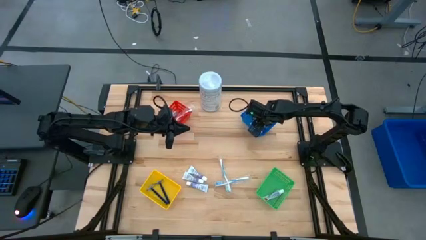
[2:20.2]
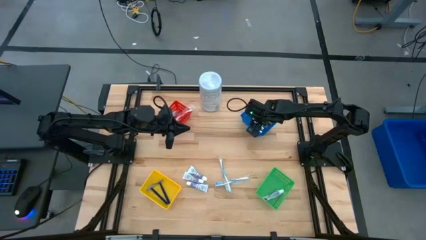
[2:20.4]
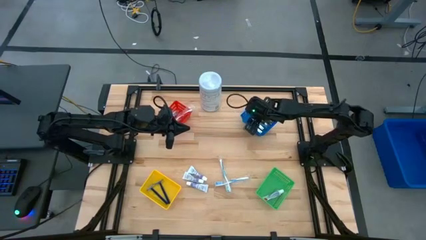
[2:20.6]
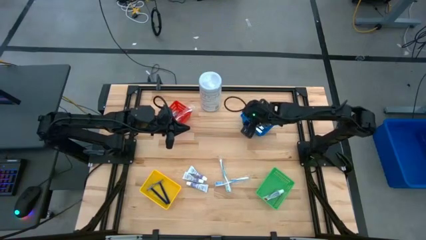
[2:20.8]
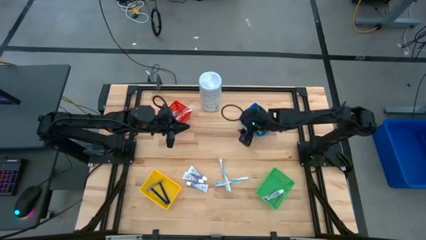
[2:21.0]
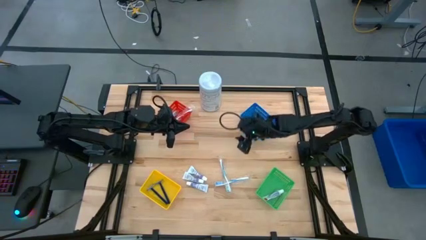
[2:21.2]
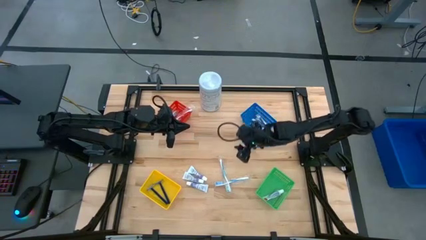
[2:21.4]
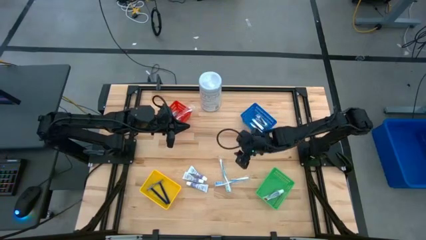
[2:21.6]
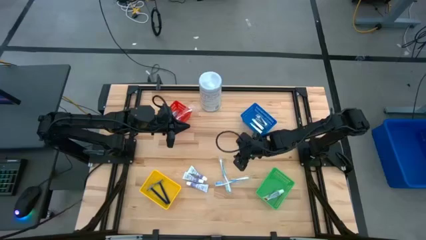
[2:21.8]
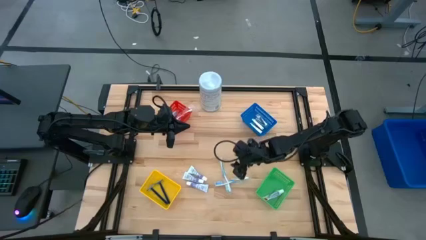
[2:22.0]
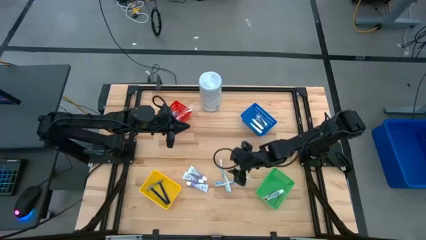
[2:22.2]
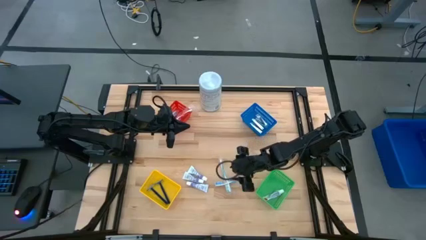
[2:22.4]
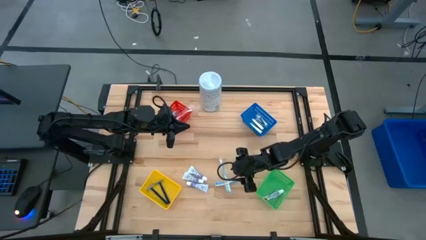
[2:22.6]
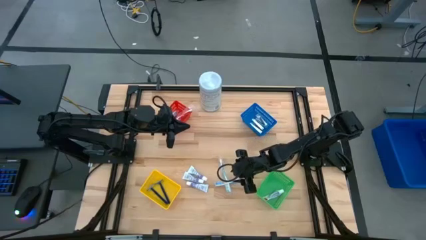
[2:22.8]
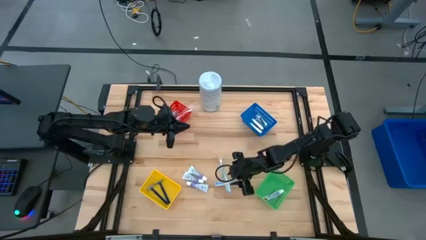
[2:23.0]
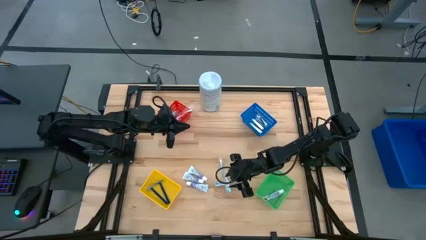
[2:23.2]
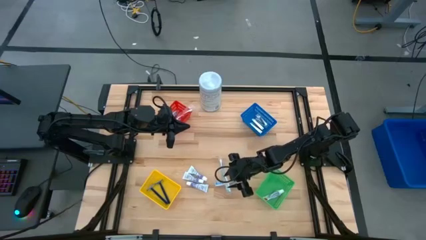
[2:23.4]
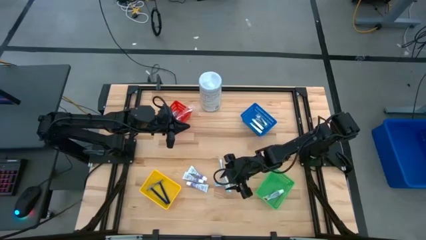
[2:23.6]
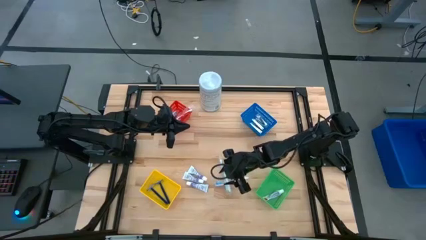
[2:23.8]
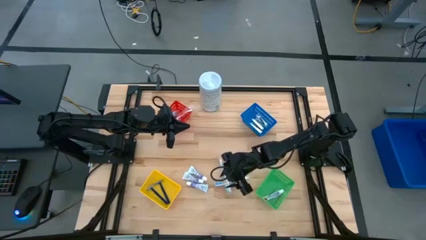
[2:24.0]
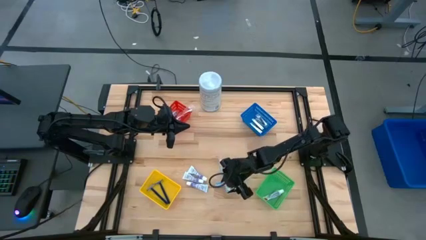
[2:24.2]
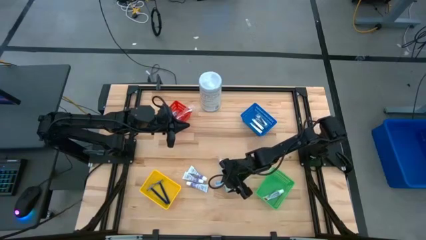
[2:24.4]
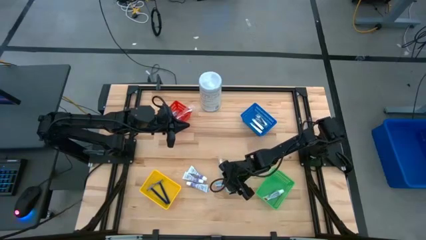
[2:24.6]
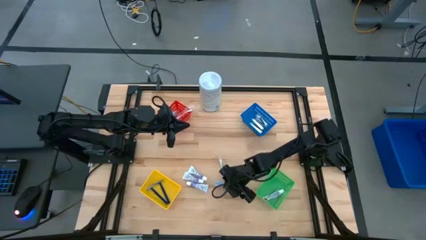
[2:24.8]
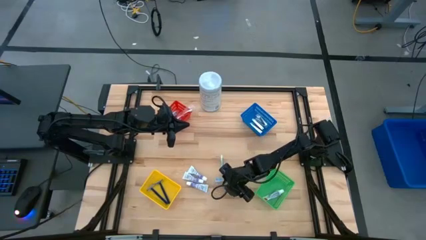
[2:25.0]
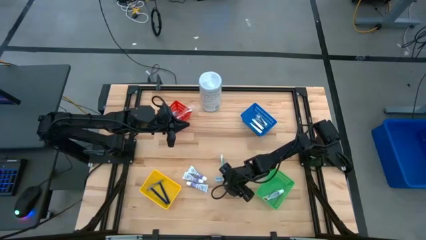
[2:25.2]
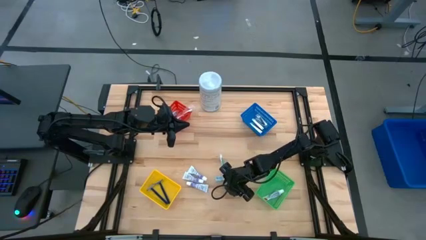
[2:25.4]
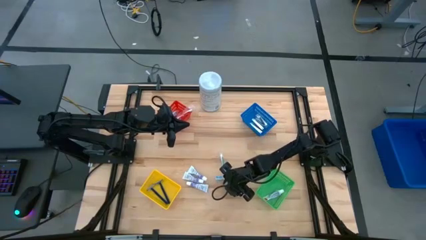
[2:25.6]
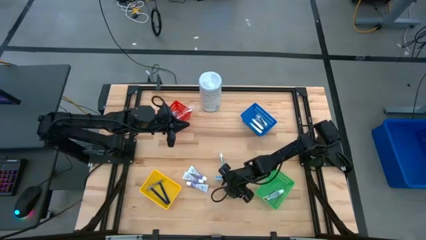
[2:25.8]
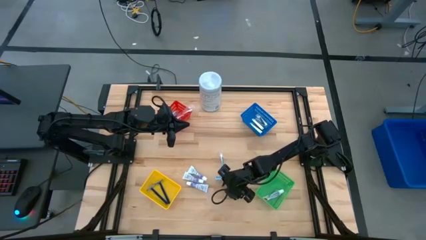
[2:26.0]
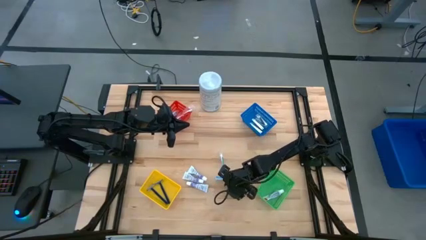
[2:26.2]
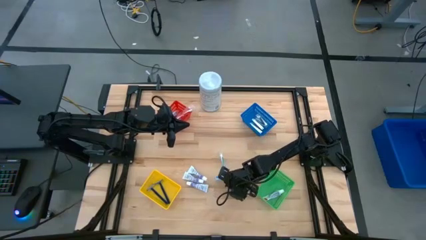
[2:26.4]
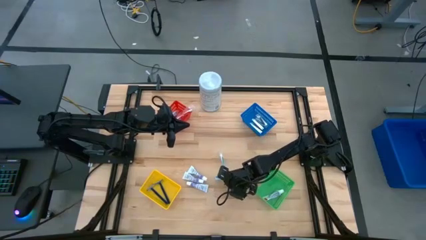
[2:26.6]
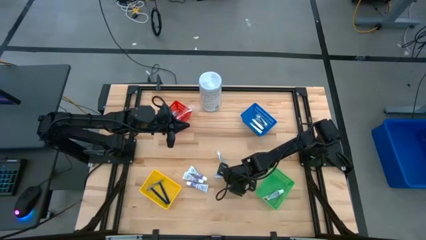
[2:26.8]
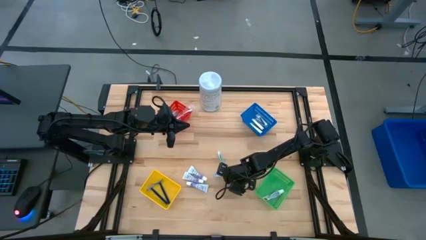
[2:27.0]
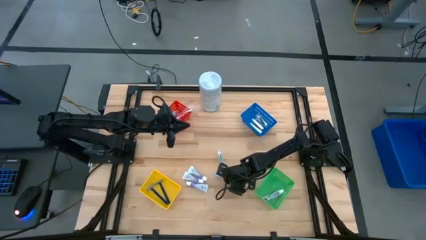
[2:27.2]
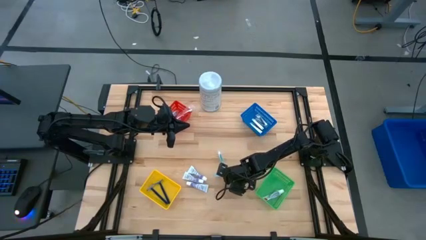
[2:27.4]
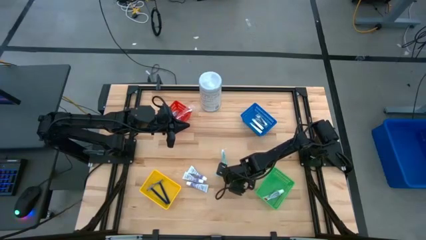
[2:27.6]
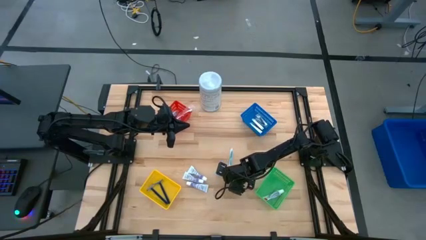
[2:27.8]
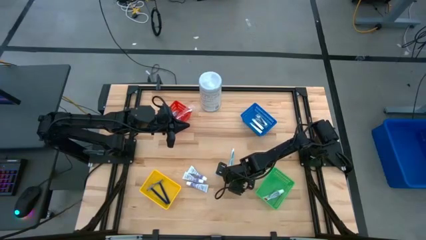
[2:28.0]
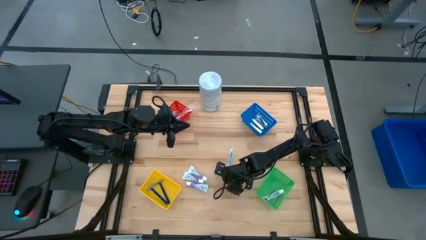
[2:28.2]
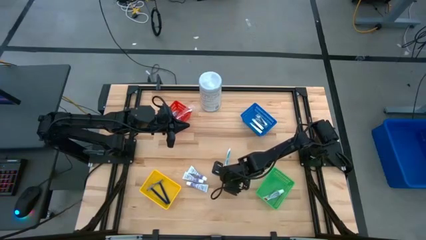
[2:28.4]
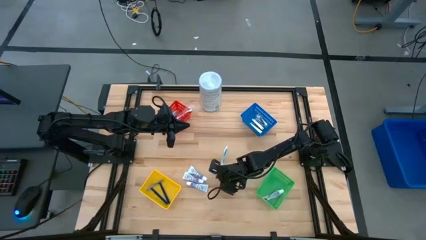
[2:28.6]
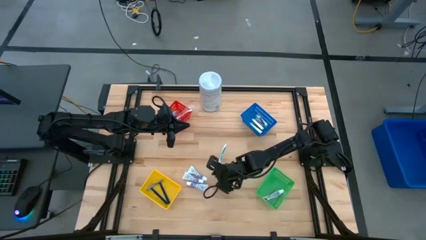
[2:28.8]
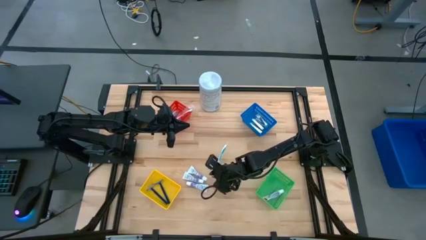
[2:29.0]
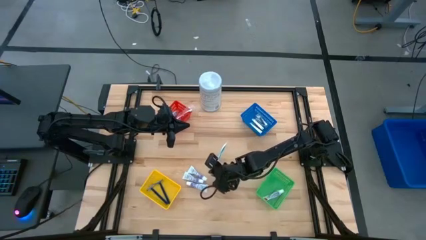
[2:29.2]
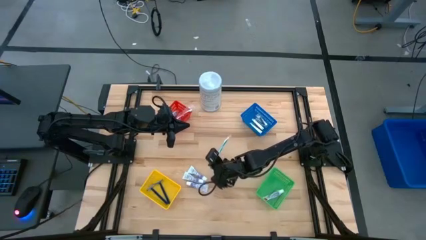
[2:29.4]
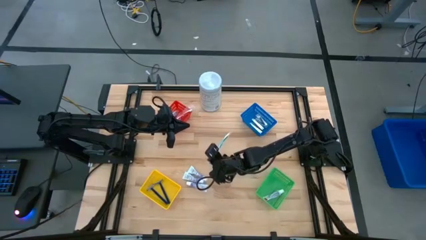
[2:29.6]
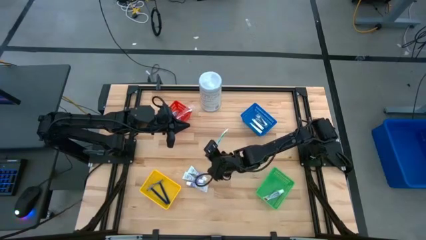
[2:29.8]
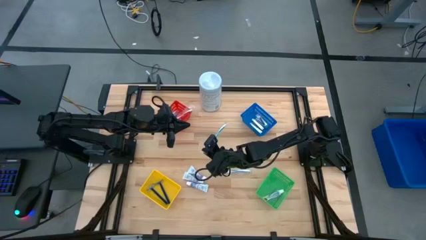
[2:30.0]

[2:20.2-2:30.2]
Task: Pick & Place Travel size toiletries
Put the green toothbrush into the orange basket

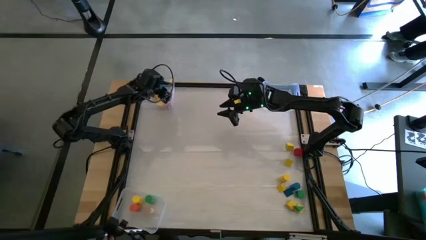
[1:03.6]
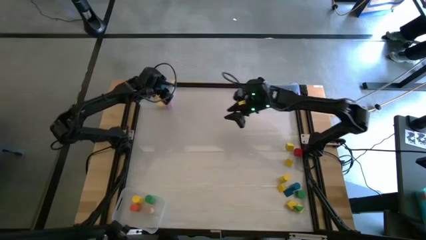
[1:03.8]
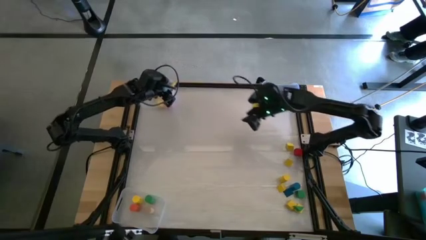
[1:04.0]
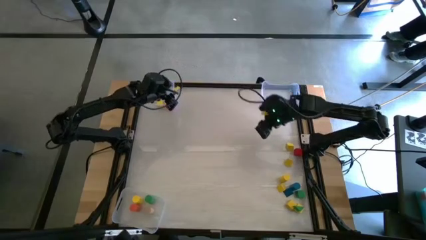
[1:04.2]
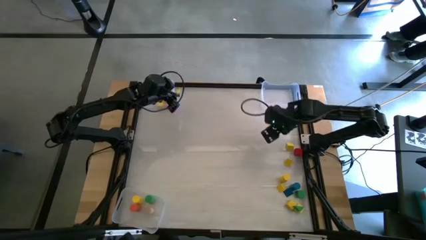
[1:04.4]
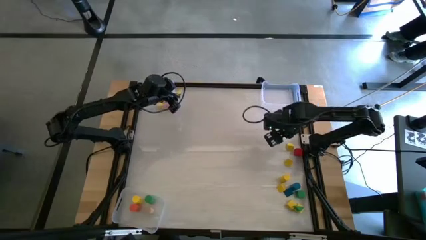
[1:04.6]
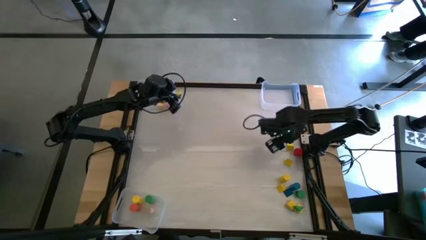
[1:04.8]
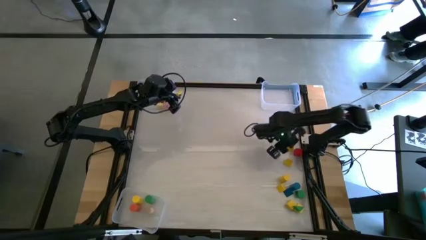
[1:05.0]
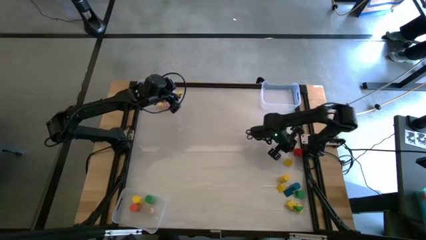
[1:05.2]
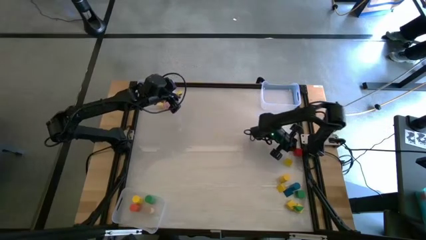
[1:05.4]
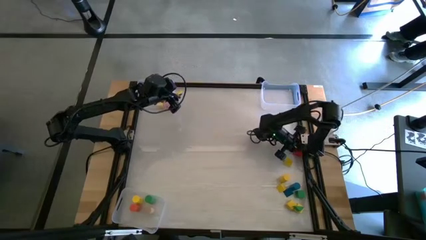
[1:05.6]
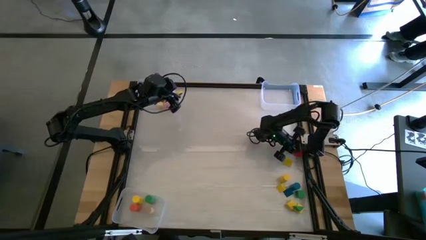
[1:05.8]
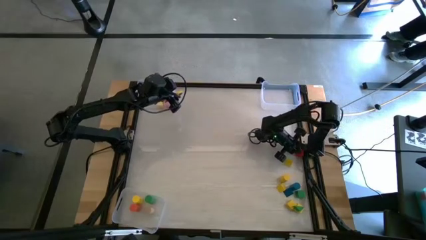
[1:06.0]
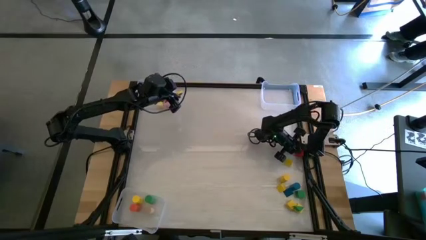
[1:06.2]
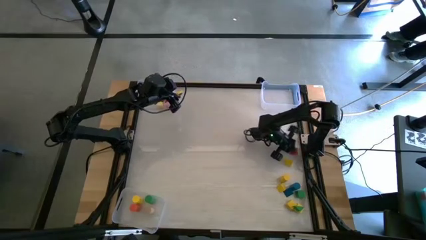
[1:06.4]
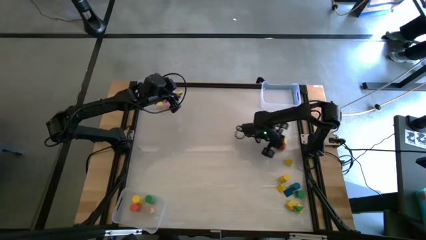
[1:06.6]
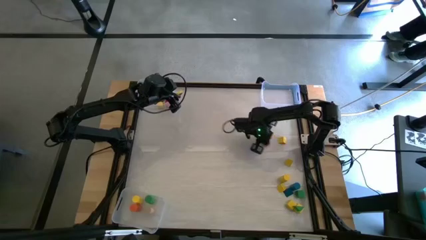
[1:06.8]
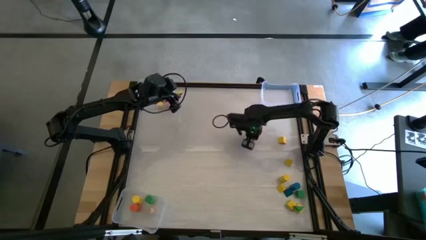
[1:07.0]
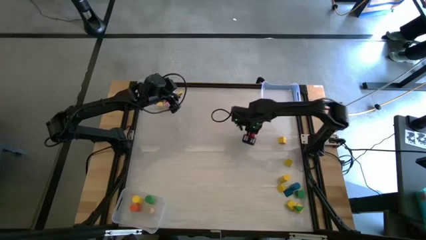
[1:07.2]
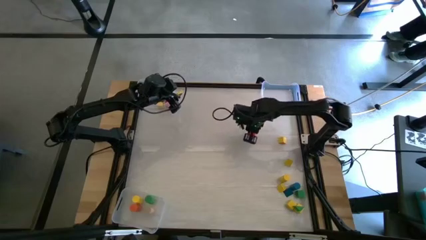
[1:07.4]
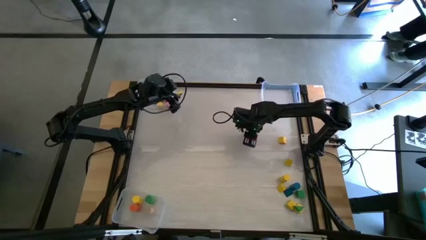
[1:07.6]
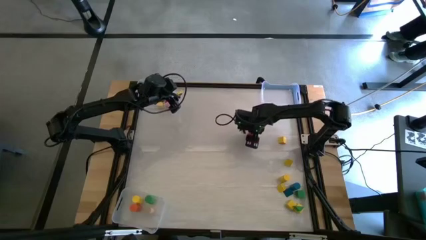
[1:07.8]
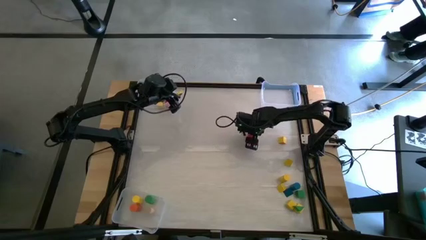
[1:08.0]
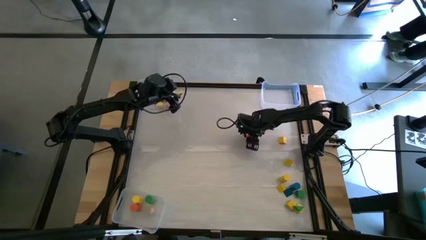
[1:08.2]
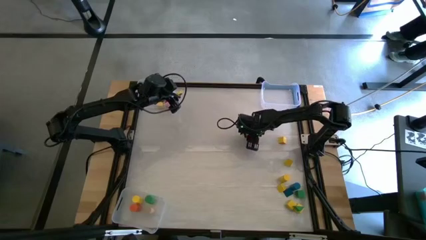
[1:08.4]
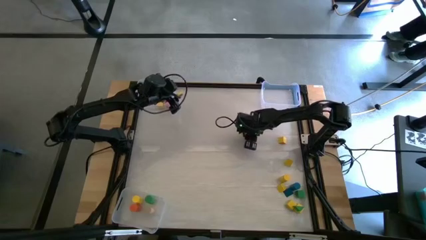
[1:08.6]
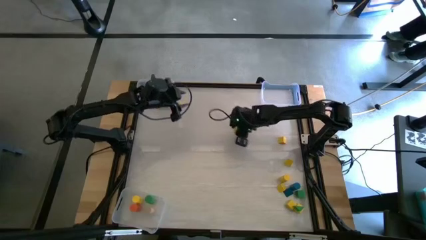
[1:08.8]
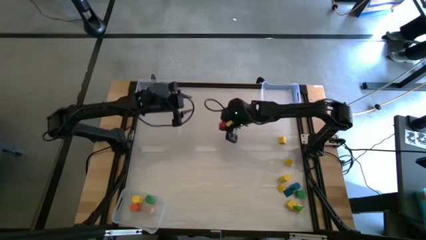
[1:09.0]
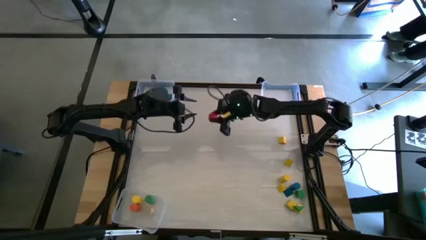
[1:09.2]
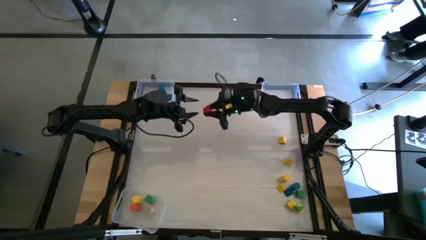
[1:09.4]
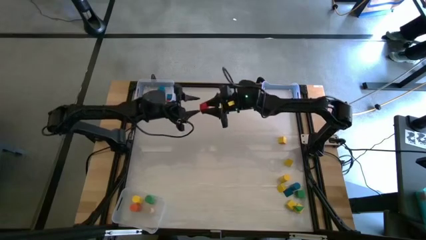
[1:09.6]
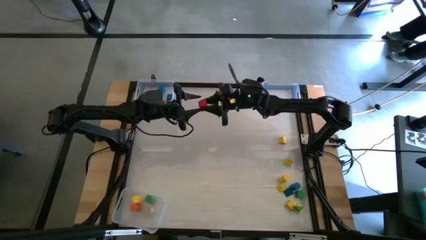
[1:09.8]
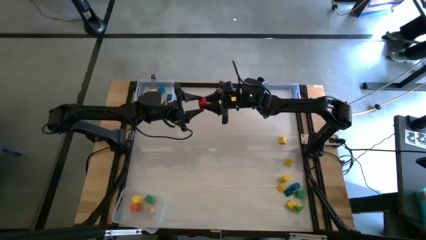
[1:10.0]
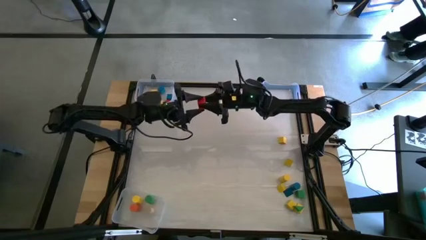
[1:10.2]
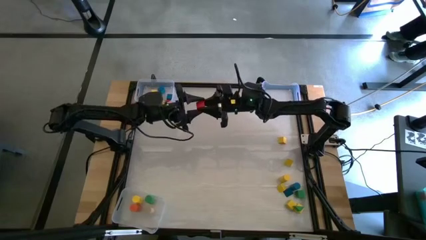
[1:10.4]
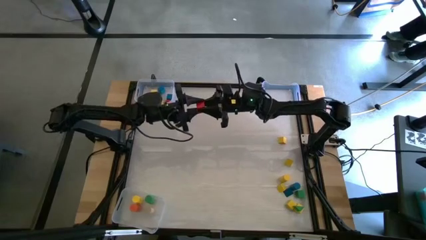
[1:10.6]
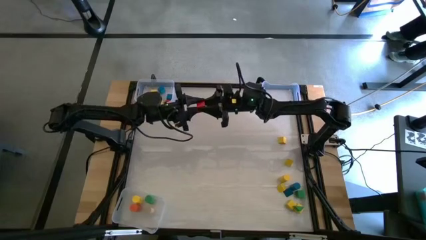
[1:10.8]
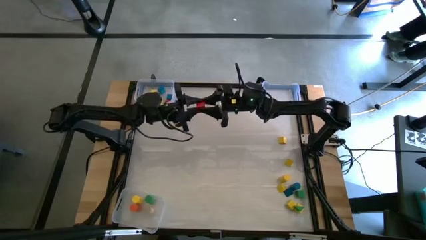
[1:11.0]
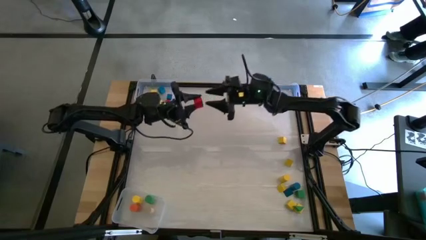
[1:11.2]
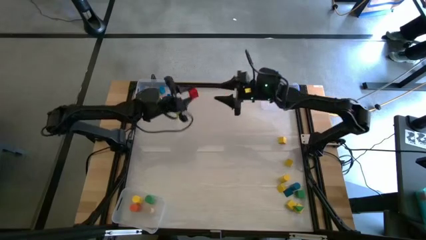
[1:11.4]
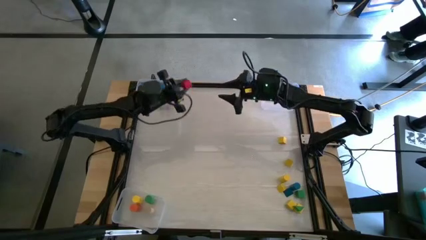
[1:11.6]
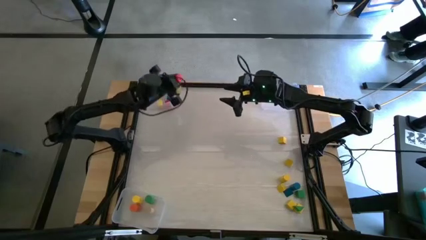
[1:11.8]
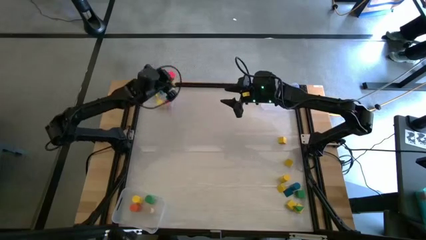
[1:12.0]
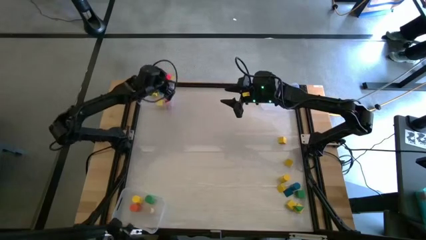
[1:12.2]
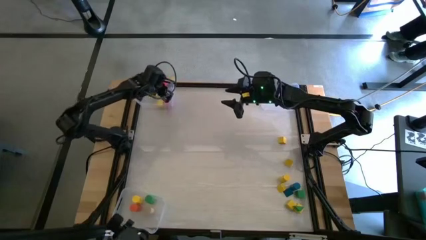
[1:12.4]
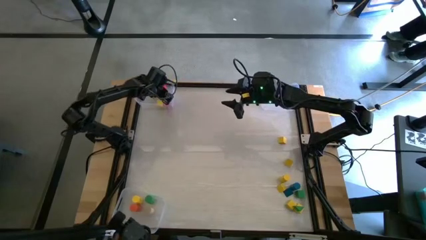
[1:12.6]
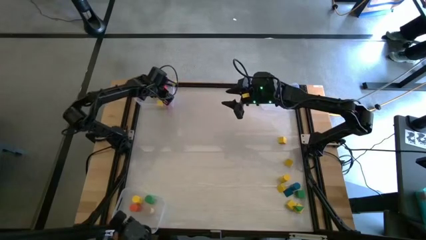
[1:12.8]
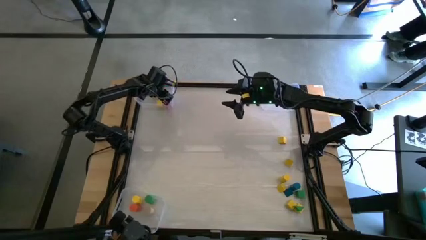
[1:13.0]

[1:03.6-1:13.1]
Task: Sort blocks by size
Put the right red cube block into the top left transparent bin
